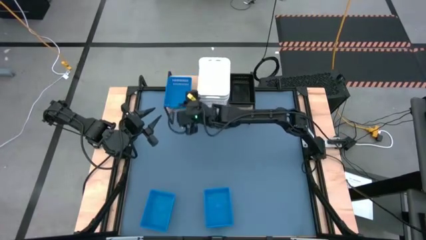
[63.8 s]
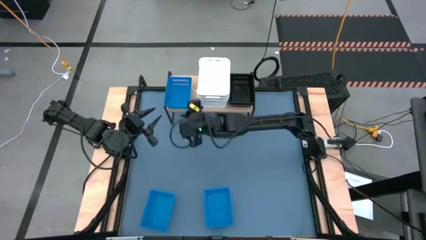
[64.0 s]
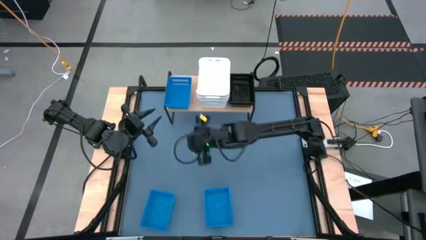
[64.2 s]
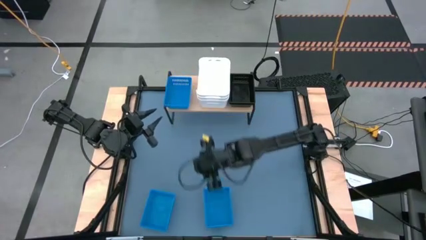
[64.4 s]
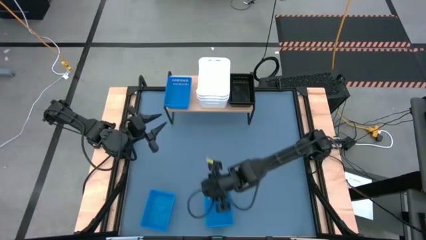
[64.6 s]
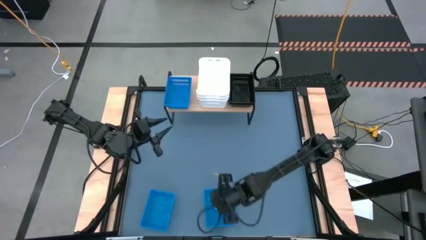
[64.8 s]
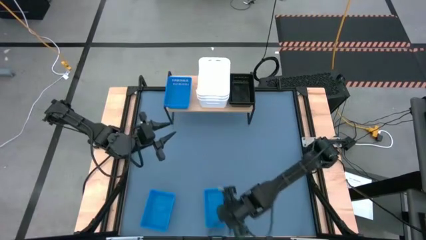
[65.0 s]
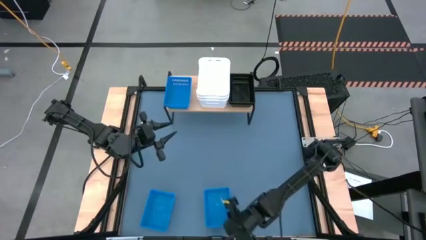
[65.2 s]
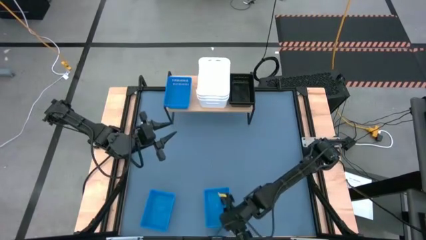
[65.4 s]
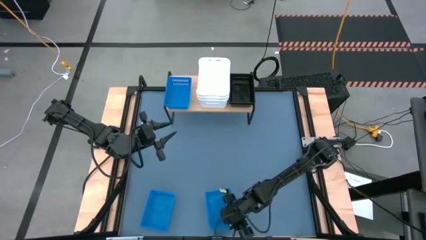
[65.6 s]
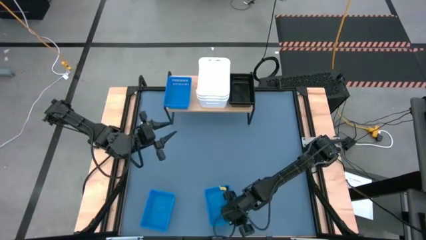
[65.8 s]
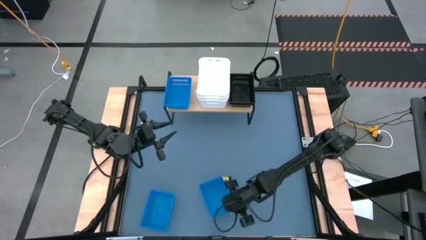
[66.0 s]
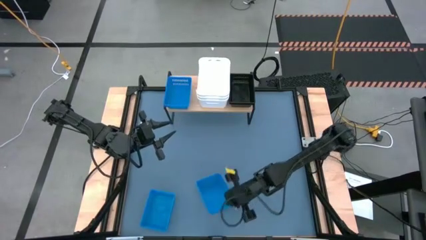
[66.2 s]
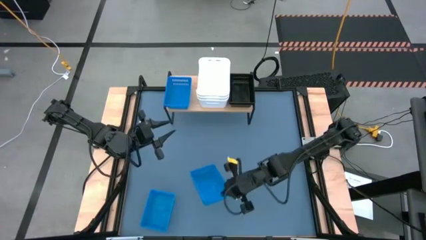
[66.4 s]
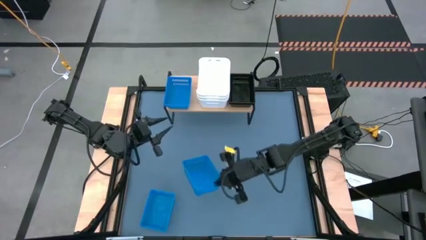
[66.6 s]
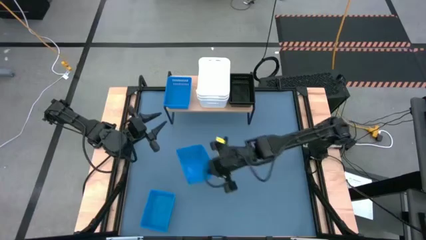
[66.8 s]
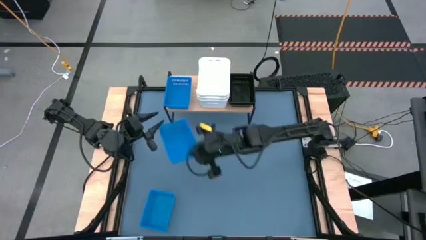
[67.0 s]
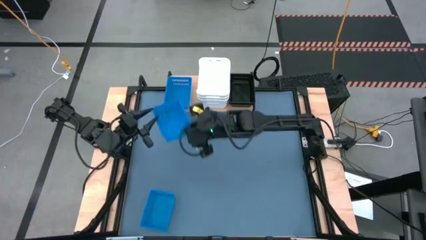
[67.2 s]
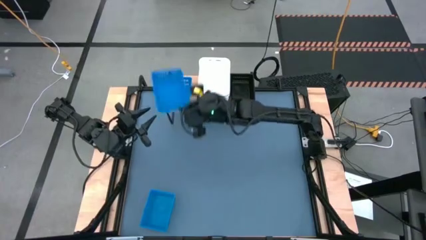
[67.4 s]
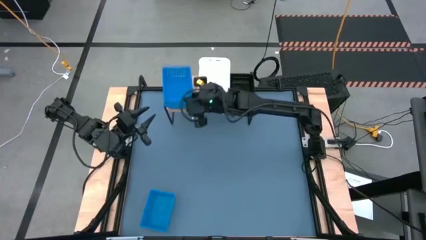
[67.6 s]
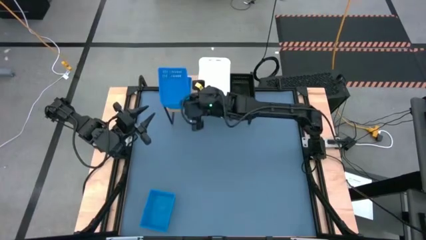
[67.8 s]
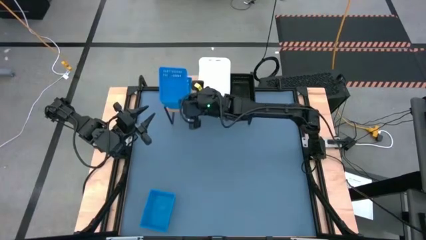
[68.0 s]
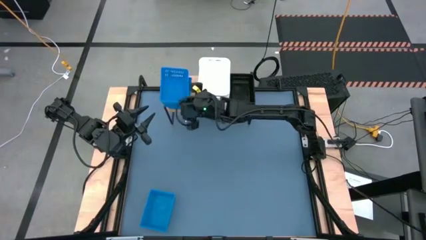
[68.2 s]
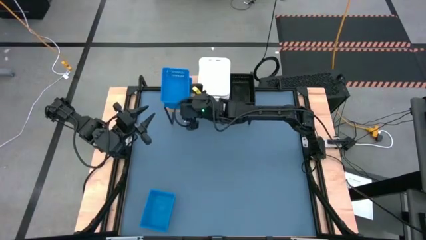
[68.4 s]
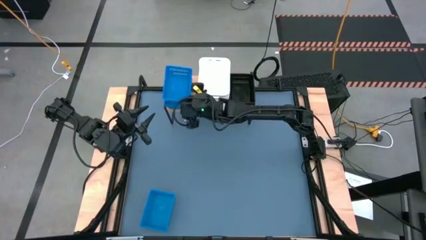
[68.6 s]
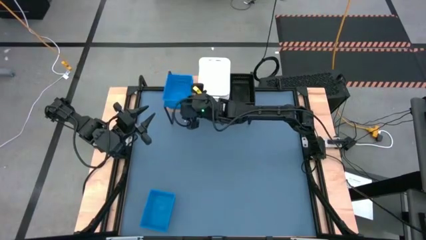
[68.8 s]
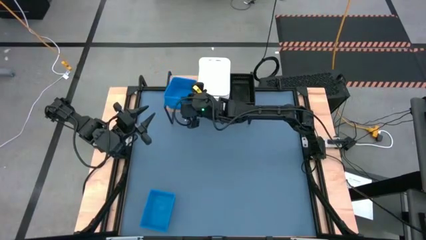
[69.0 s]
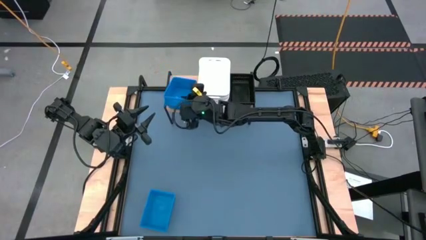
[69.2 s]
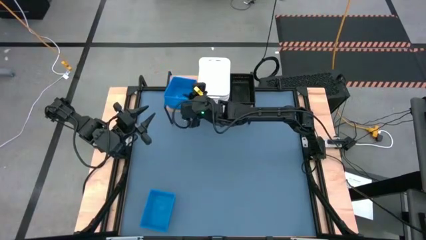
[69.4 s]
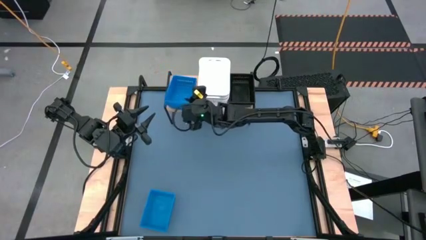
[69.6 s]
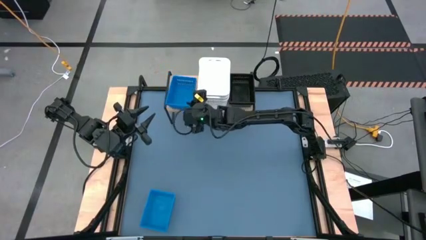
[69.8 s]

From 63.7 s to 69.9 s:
Task: Stack baskets on shelf by color
Stack the blue bin on the blue bin on the shelf

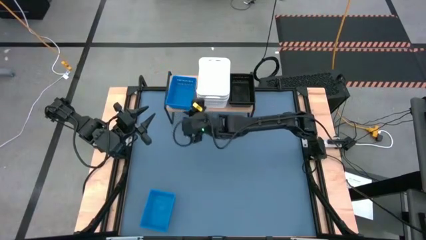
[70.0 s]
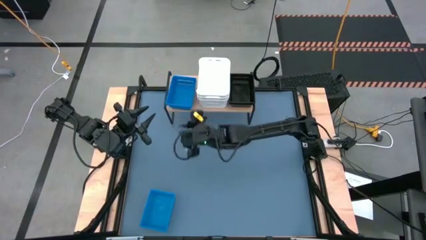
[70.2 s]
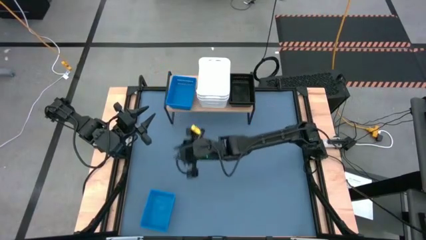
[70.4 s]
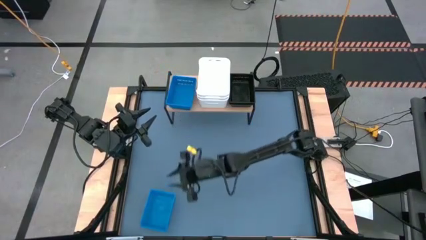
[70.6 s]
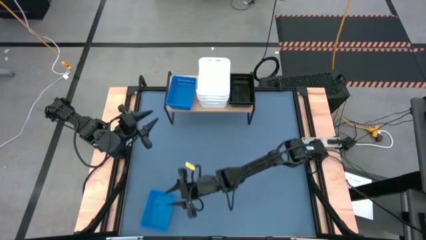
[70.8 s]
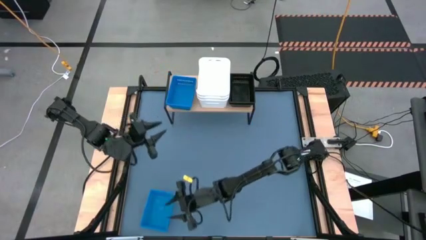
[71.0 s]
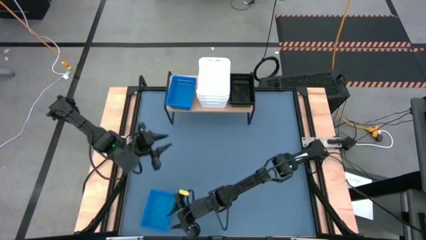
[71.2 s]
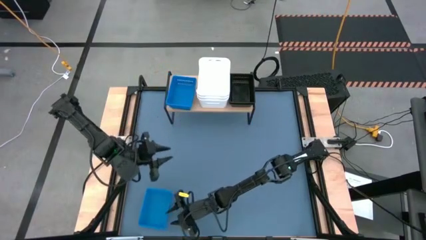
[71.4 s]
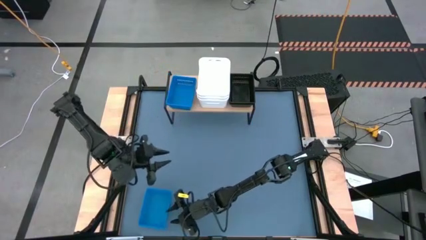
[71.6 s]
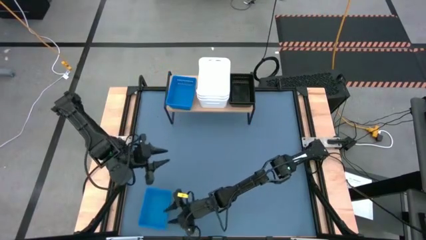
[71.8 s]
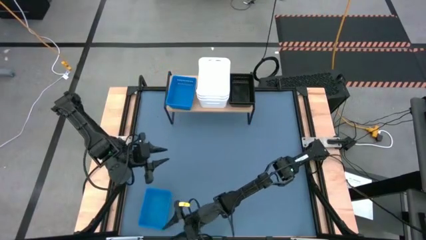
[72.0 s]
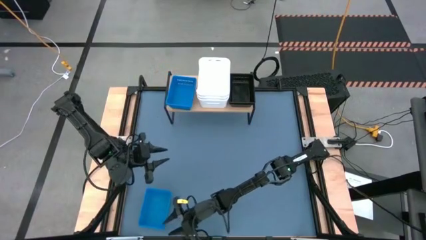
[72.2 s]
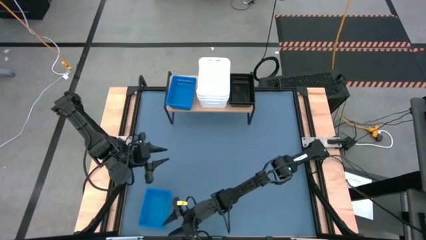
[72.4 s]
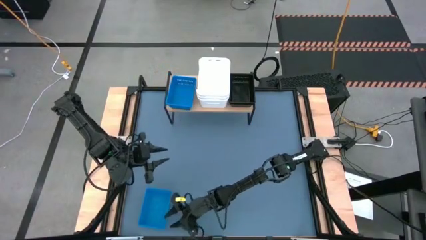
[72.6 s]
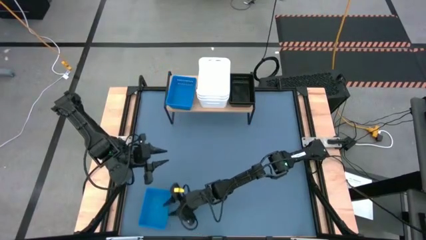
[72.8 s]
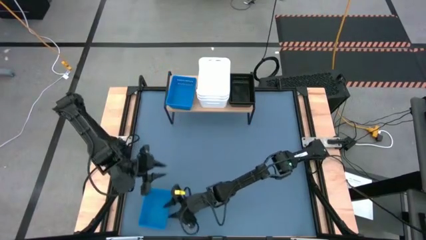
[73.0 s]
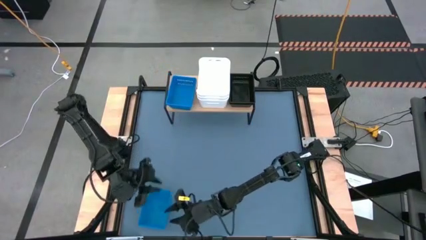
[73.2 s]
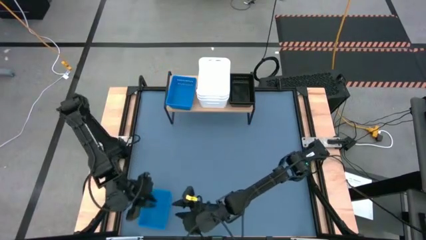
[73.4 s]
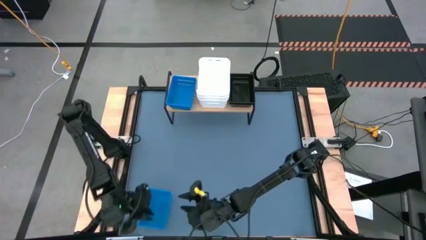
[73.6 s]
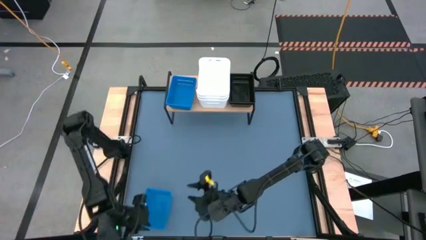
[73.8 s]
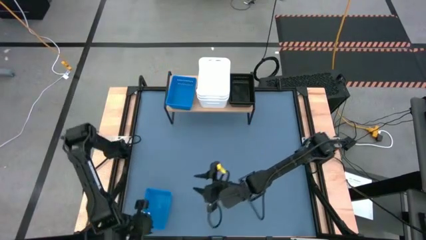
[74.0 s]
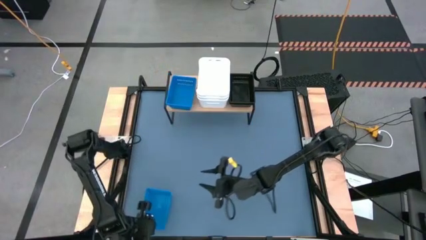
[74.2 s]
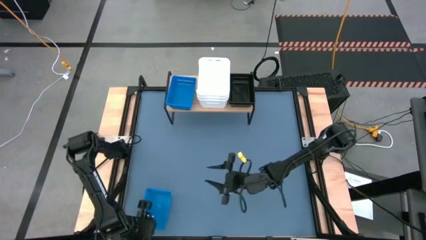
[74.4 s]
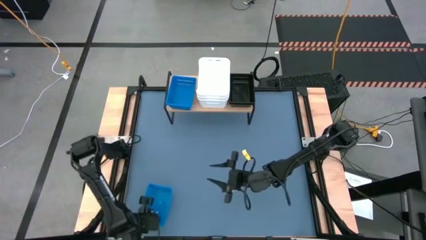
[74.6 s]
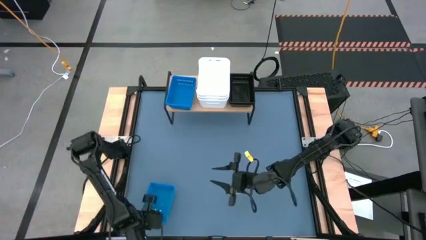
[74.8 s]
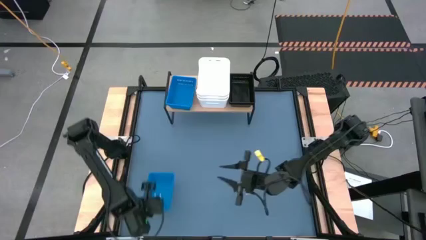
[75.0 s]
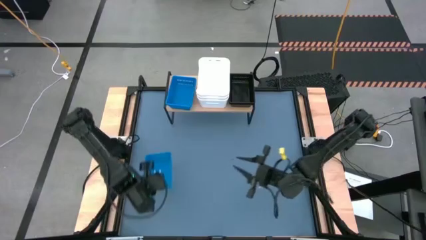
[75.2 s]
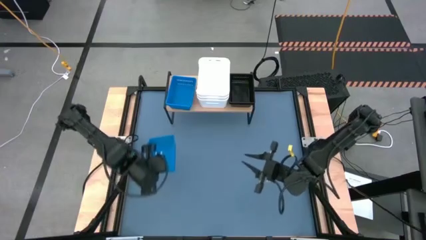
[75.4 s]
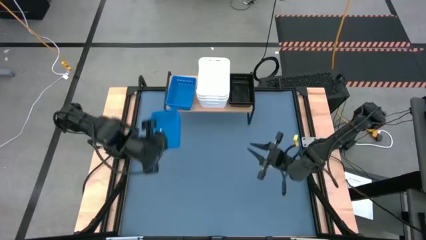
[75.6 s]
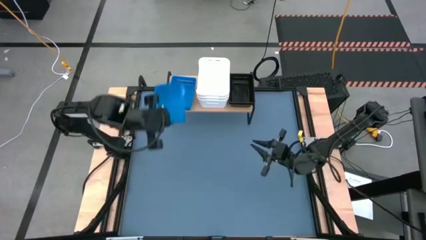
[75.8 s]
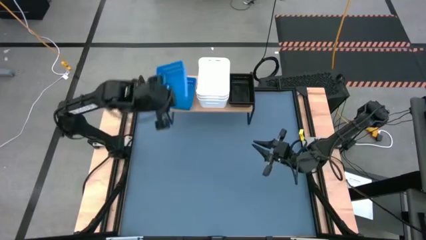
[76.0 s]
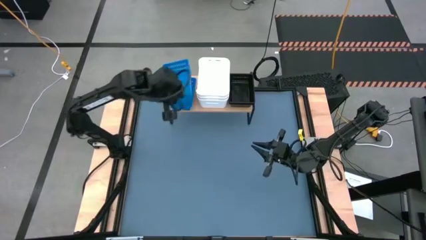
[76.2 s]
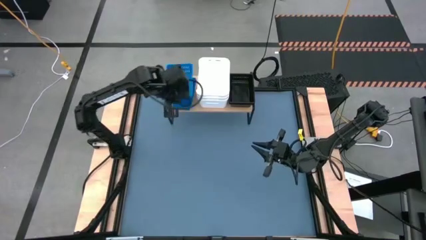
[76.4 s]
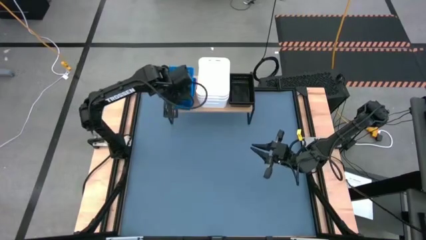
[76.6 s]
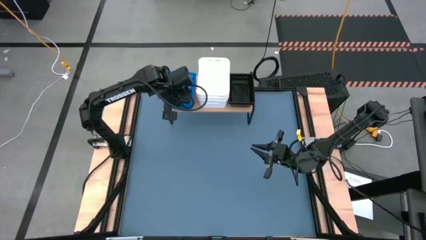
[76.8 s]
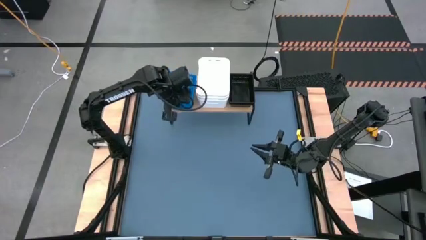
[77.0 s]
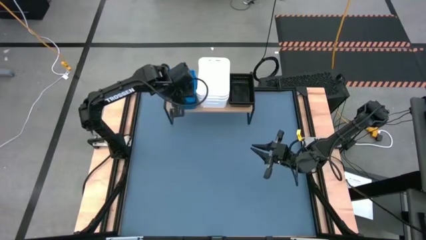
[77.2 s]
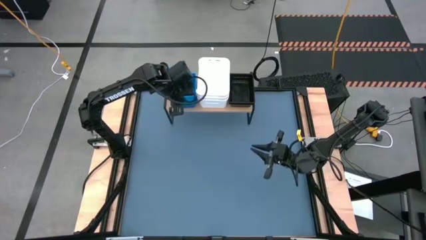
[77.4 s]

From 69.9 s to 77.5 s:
Stack the blue bin on the blue bin on the shelf
